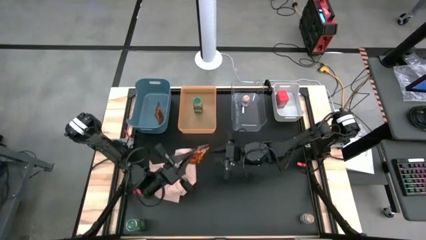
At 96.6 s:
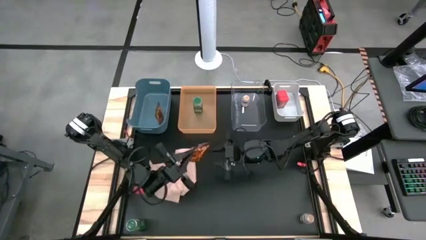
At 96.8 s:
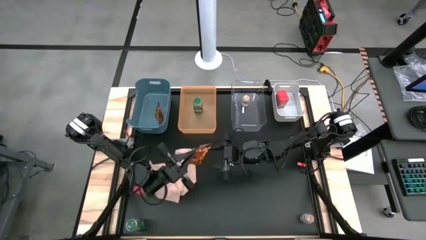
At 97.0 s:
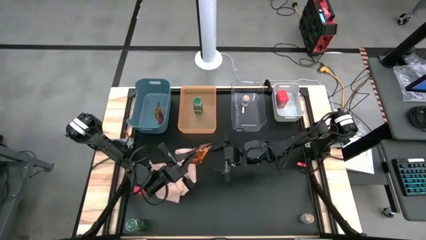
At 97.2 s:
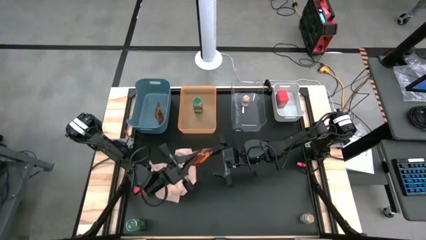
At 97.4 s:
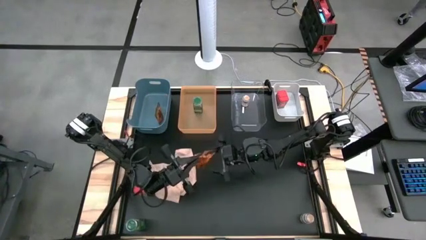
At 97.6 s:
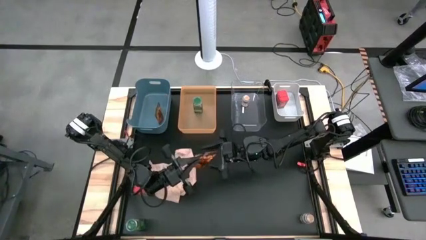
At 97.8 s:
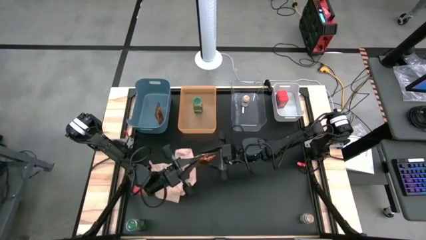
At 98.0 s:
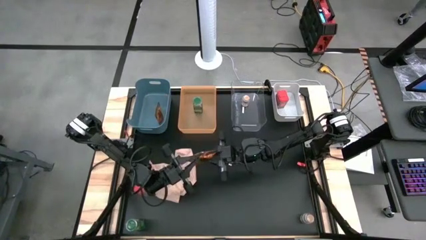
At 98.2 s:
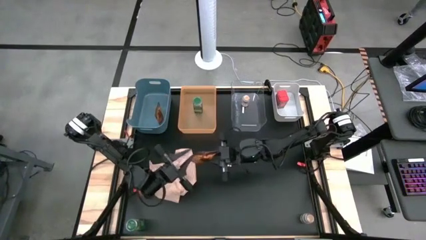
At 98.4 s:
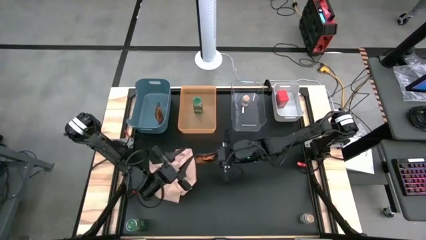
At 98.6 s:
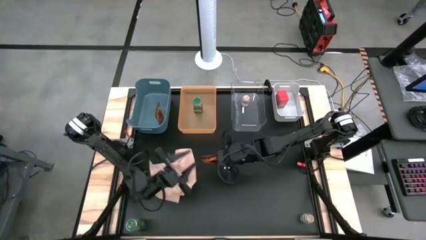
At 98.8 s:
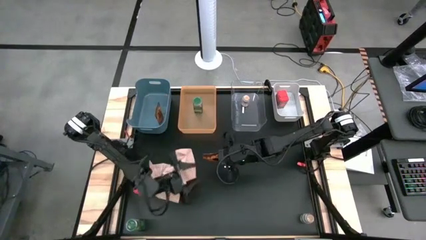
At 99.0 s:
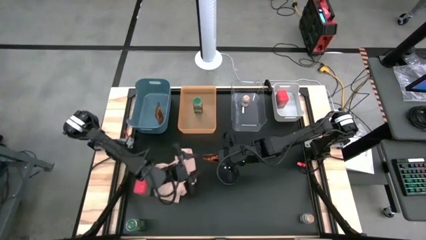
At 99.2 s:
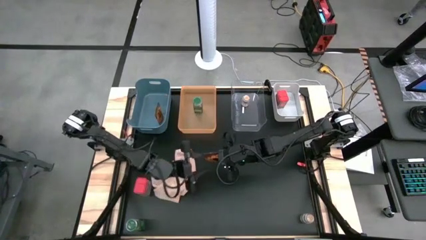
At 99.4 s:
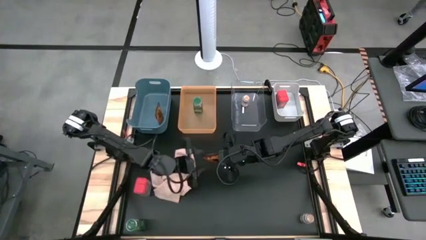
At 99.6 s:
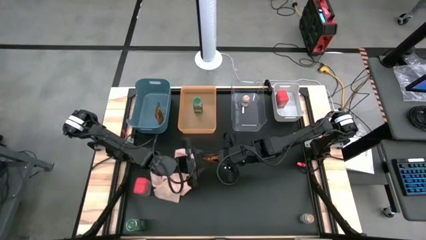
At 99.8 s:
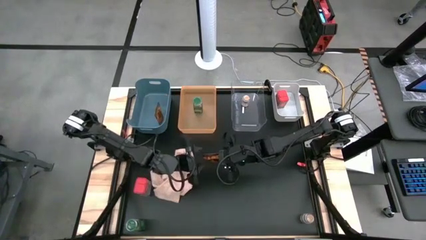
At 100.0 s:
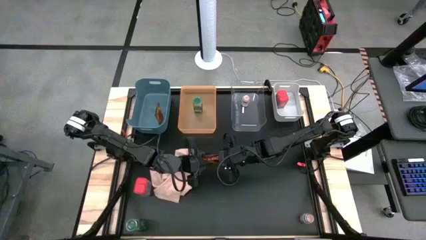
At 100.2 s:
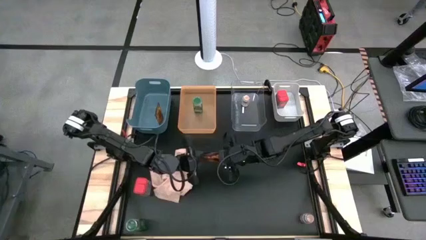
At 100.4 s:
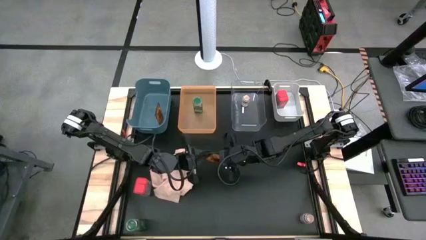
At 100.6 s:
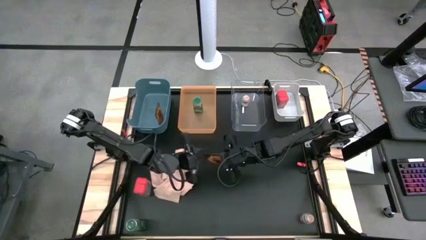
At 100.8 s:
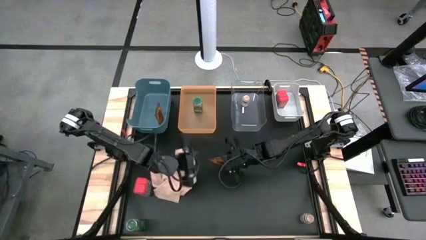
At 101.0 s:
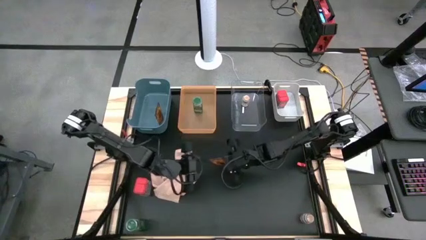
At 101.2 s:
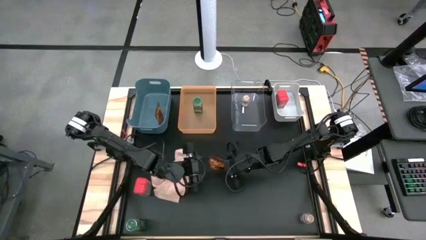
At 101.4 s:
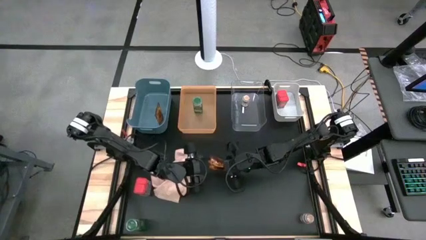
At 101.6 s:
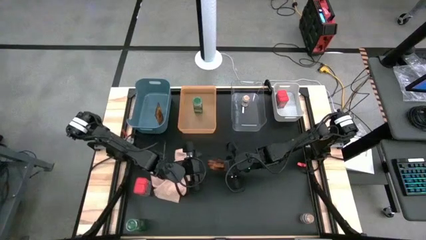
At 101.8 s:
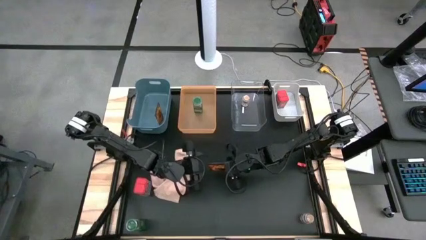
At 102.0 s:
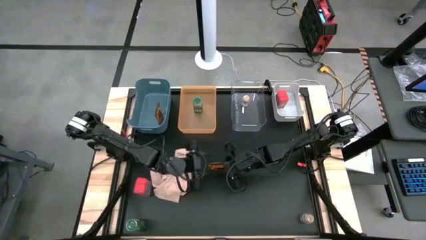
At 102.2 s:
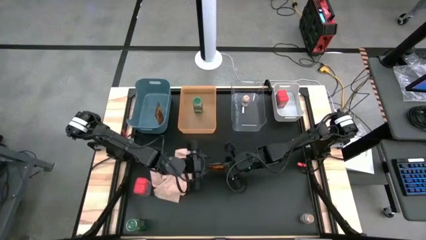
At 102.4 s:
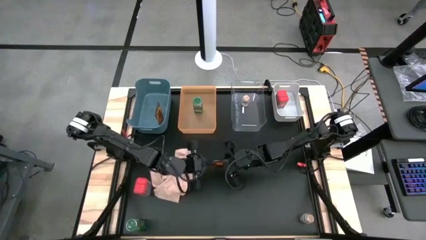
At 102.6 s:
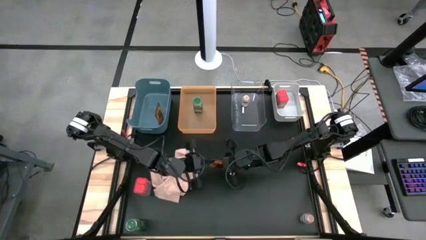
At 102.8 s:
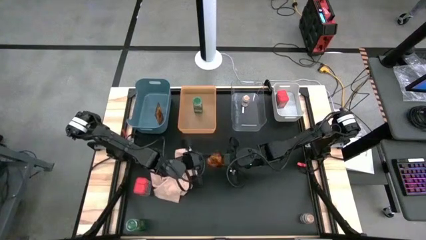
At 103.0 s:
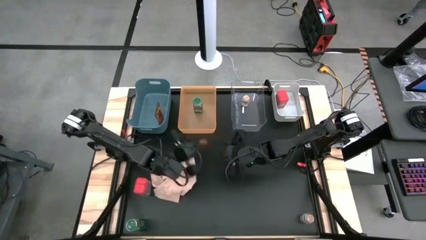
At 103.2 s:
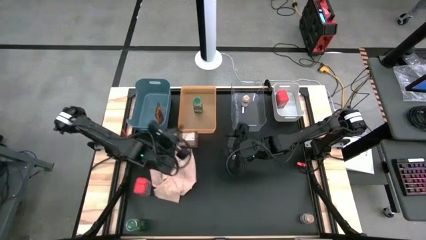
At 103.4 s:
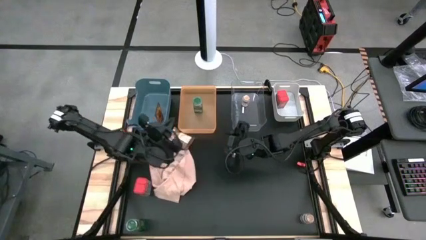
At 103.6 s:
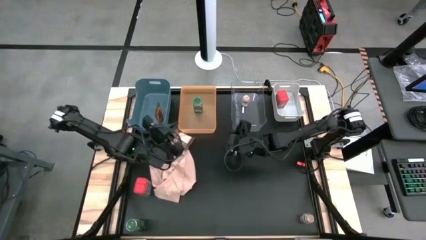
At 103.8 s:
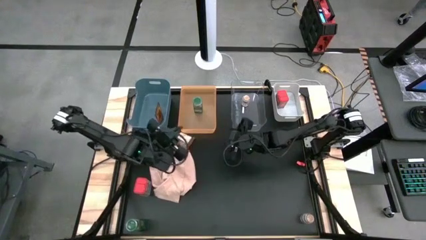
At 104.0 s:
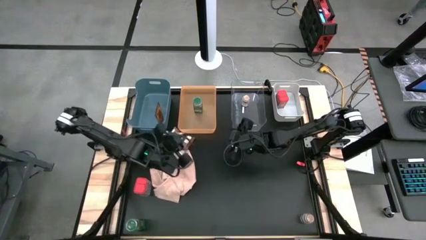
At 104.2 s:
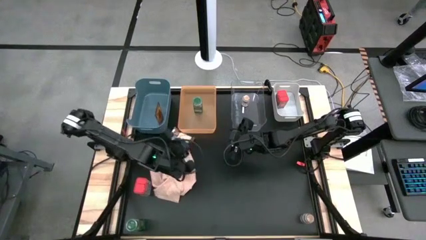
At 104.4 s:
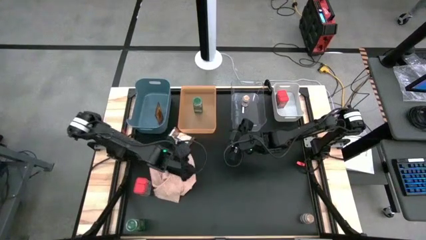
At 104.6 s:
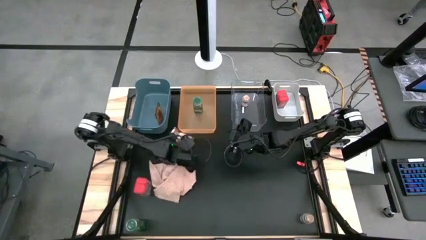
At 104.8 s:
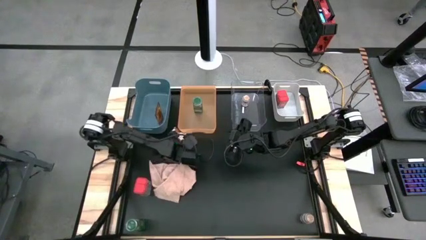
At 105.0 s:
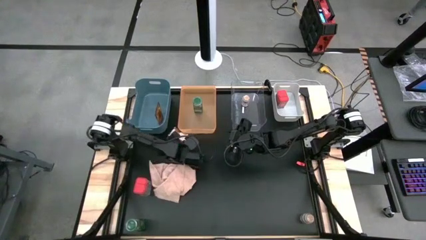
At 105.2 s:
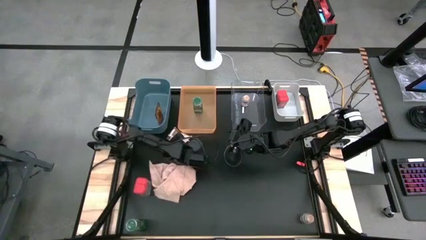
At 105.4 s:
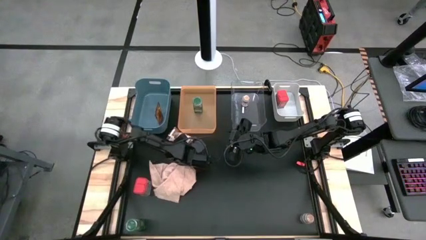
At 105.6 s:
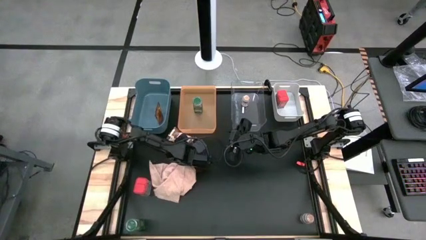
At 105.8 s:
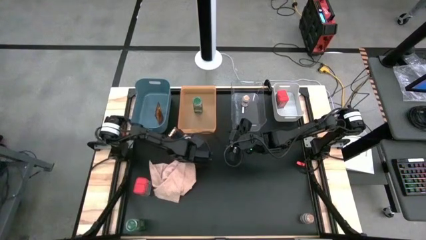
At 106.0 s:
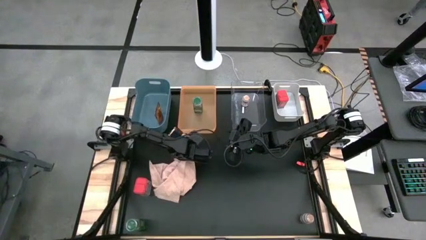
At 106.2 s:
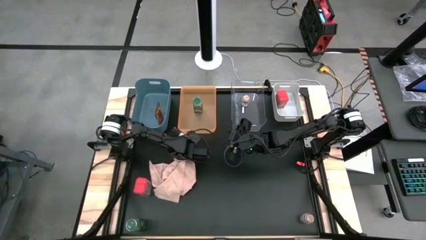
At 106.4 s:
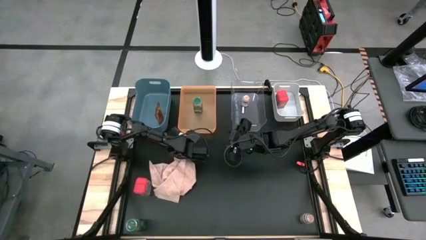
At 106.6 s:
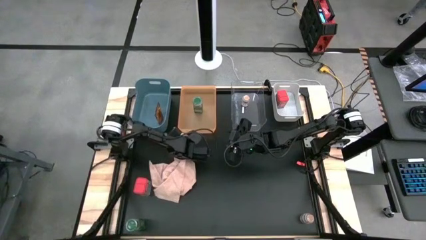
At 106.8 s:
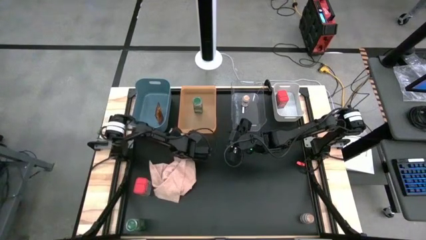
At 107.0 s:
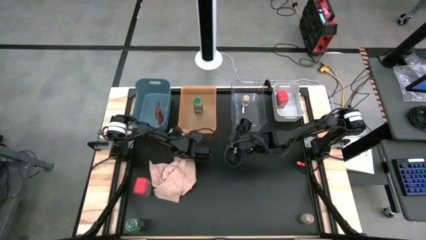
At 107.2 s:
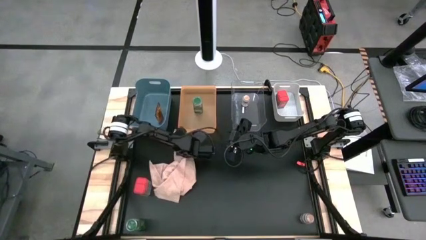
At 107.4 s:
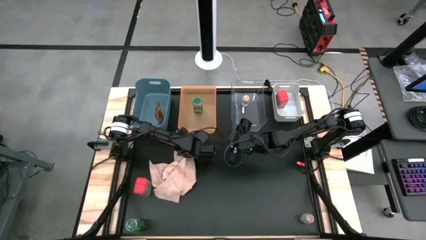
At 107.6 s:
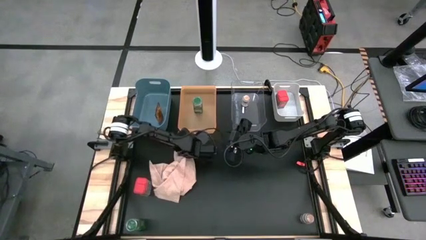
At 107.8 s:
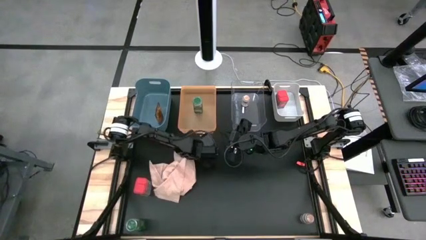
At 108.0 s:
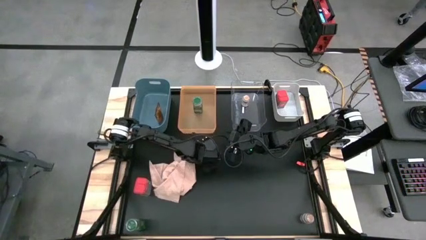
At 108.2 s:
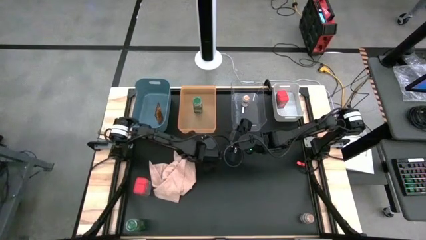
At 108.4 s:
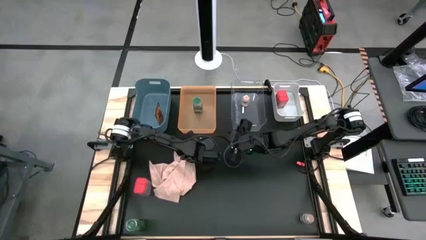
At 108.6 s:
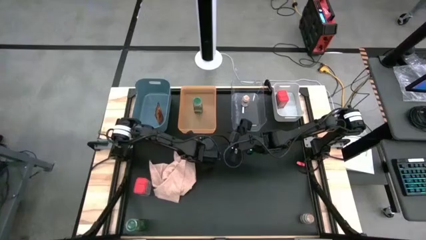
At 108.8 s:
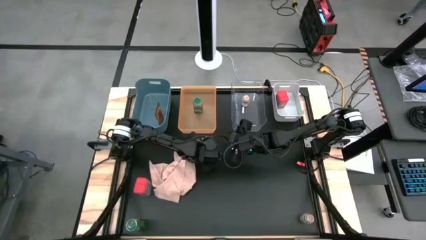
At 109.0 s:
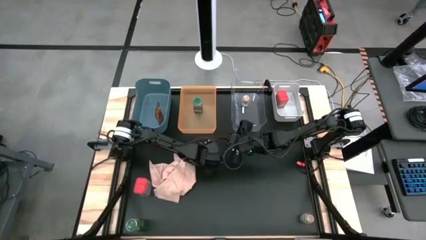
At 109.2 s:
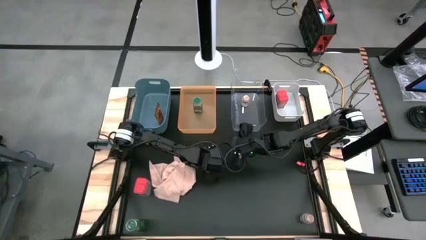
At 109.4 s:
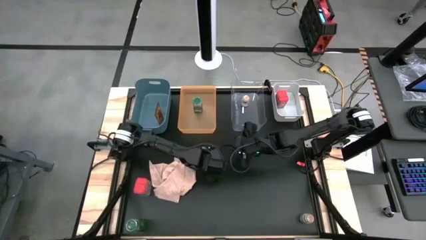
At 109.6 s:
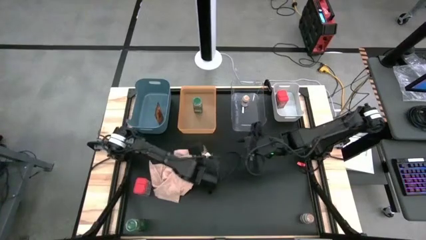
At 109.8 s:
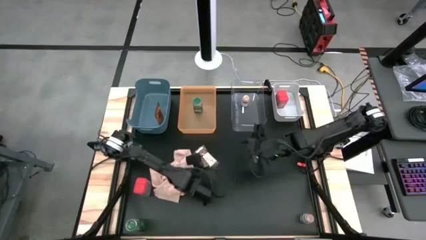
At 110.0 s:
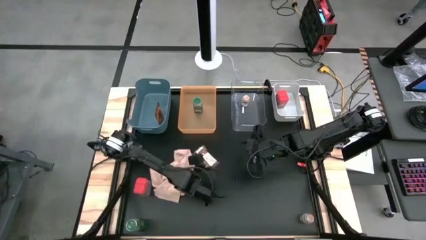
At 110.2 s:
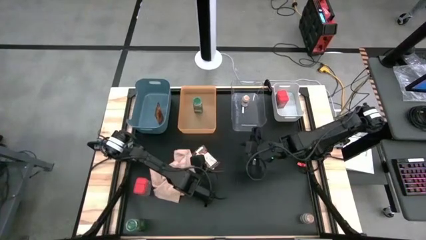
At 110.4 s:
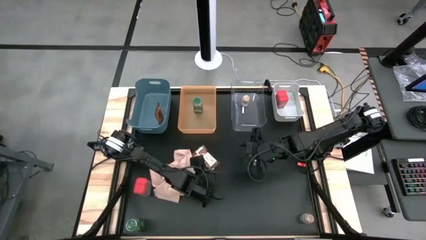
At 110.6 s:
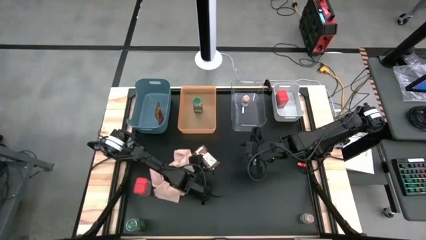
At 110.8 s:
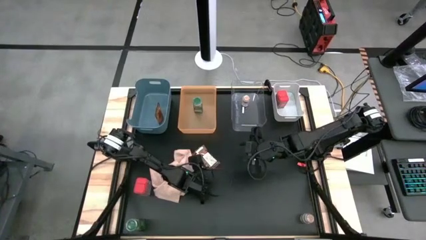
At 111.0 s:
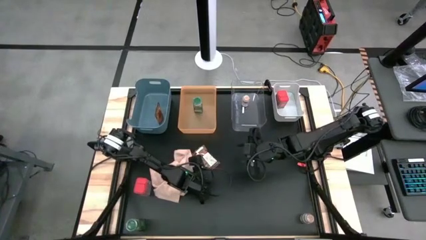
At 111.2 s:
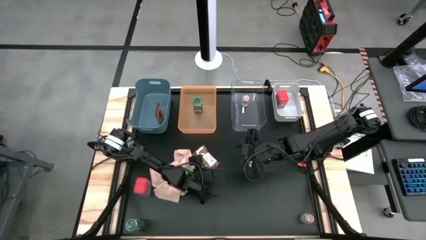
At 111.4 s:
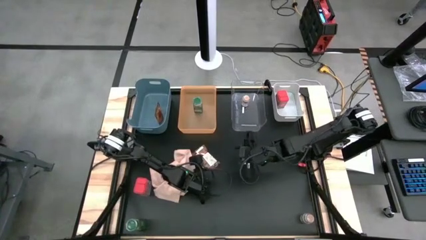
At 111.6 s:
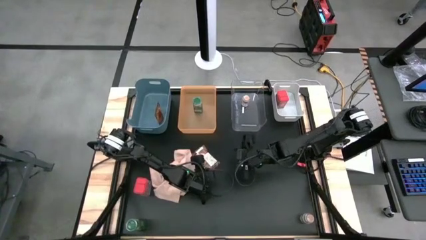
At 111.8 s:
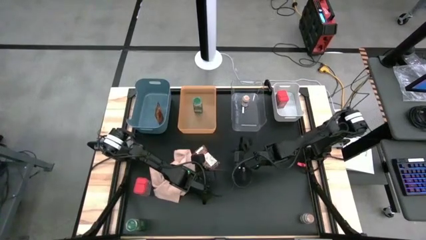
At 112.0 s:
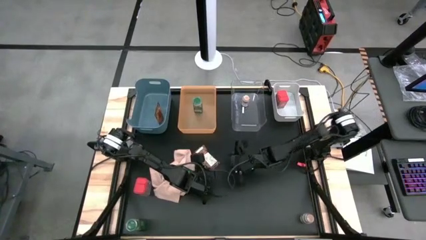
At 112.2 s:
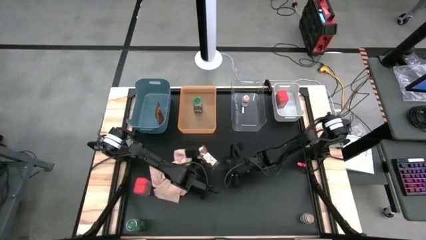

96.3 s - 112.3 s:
Task: Sort spices by type
Put the orange seasoning pack into the blue bin
